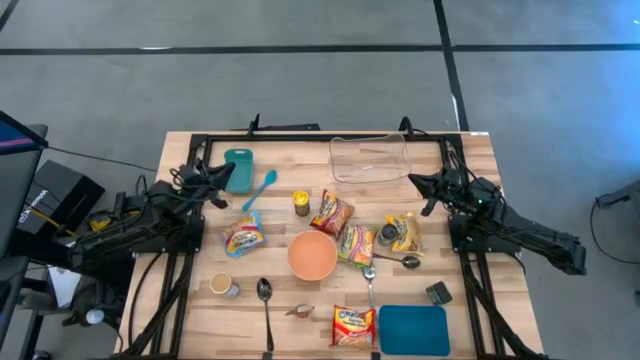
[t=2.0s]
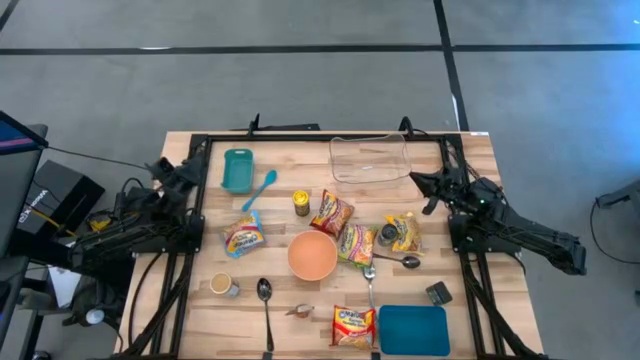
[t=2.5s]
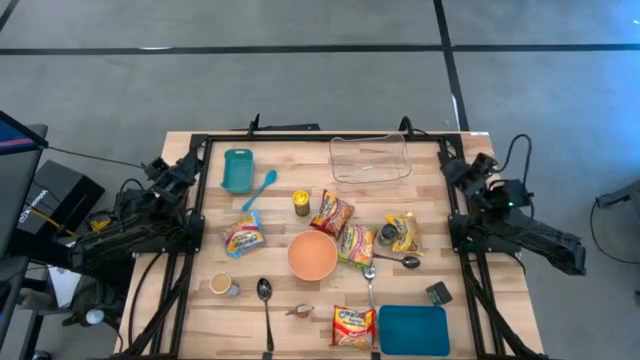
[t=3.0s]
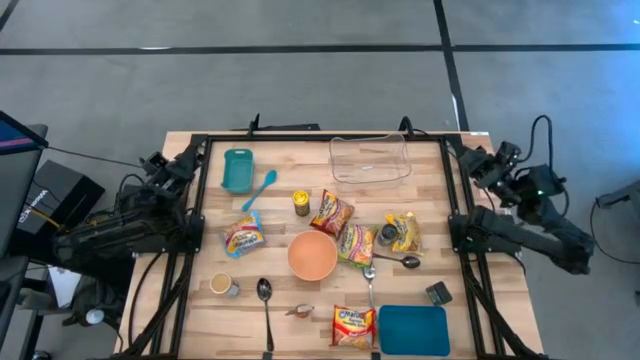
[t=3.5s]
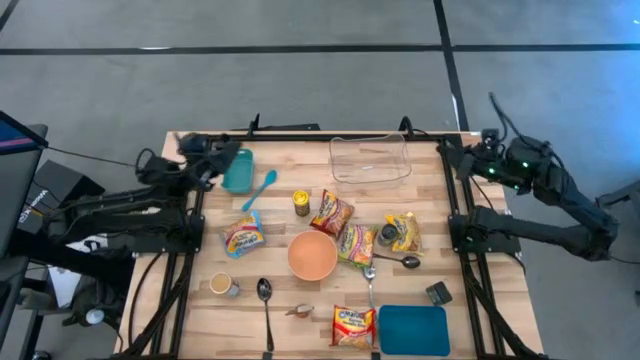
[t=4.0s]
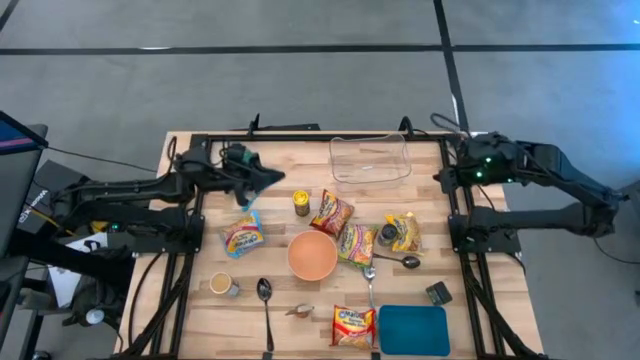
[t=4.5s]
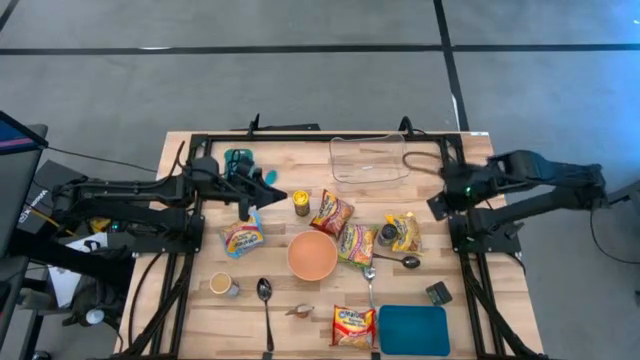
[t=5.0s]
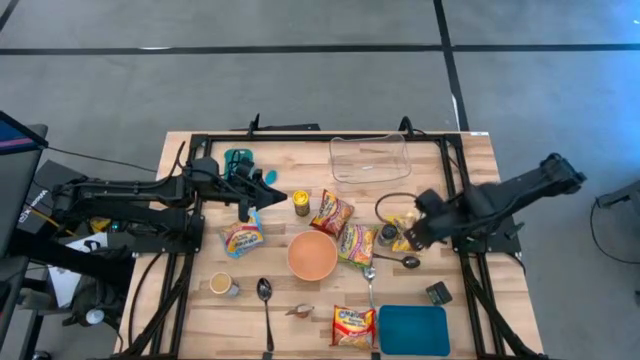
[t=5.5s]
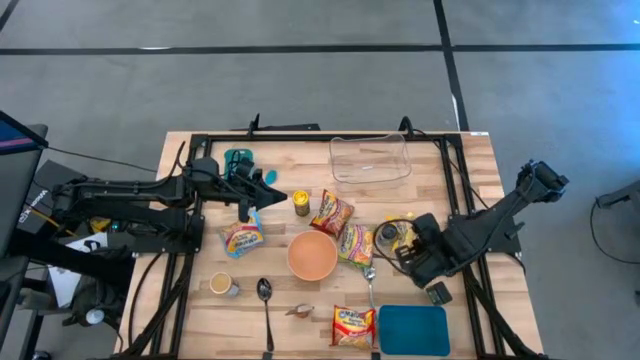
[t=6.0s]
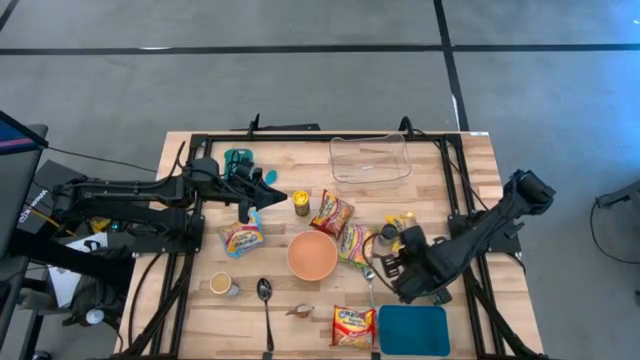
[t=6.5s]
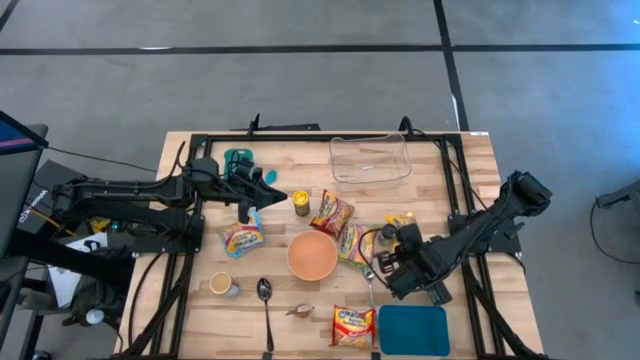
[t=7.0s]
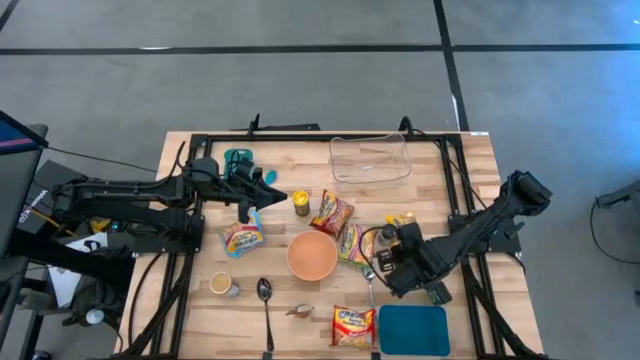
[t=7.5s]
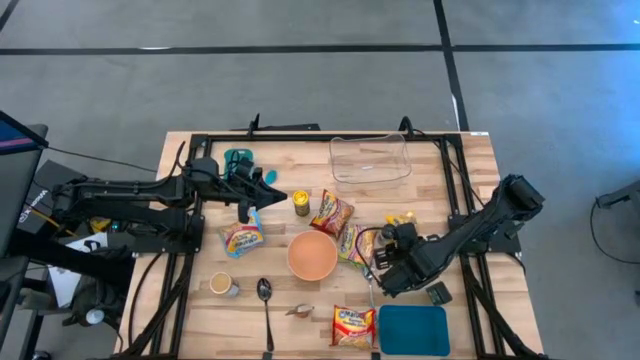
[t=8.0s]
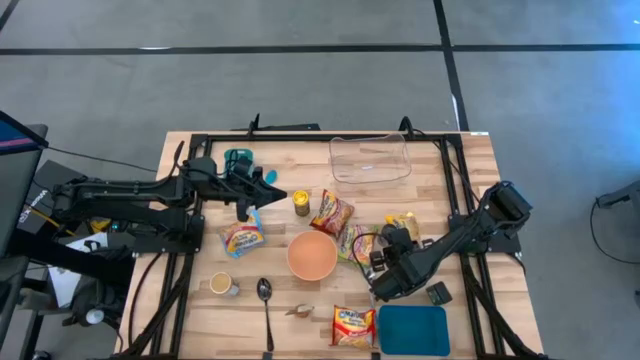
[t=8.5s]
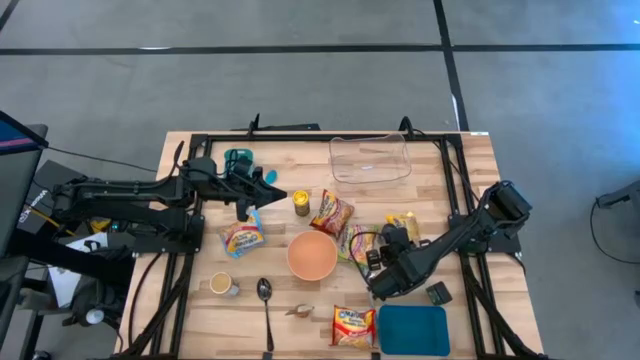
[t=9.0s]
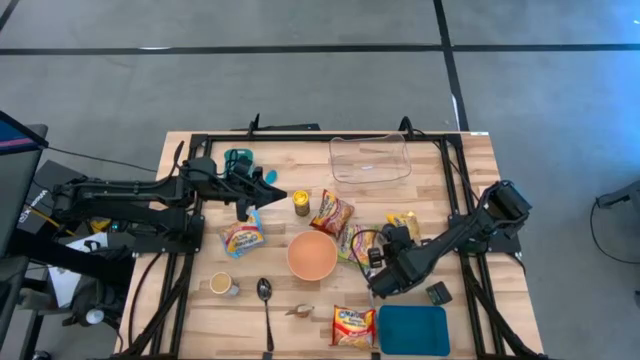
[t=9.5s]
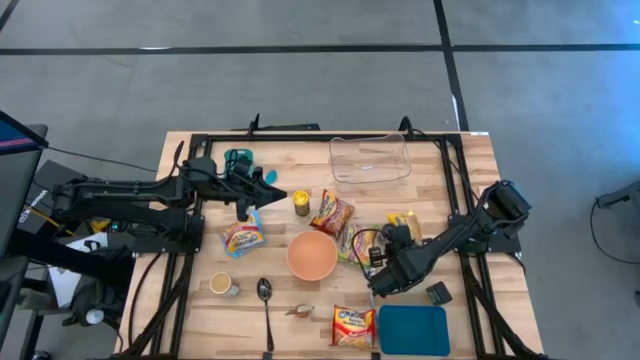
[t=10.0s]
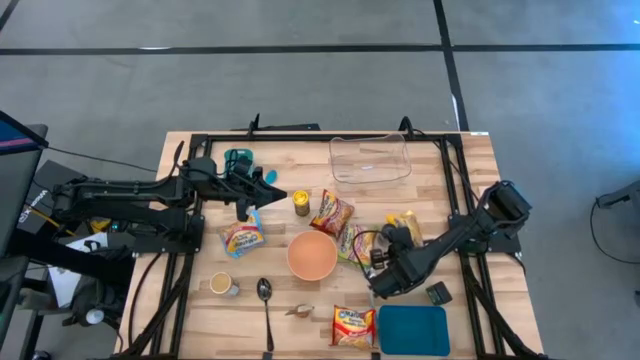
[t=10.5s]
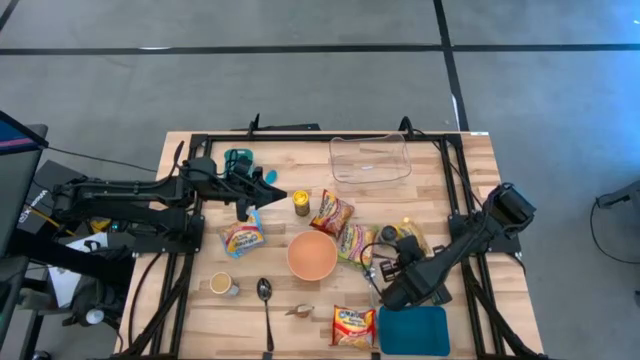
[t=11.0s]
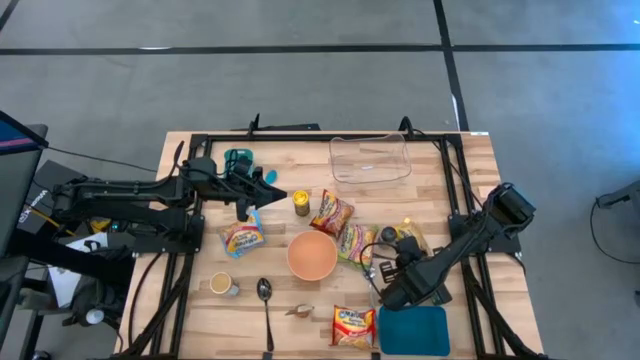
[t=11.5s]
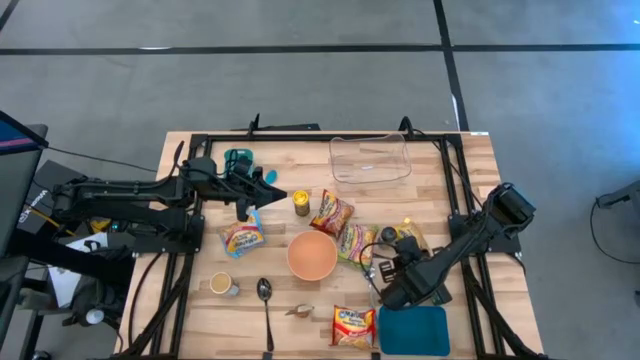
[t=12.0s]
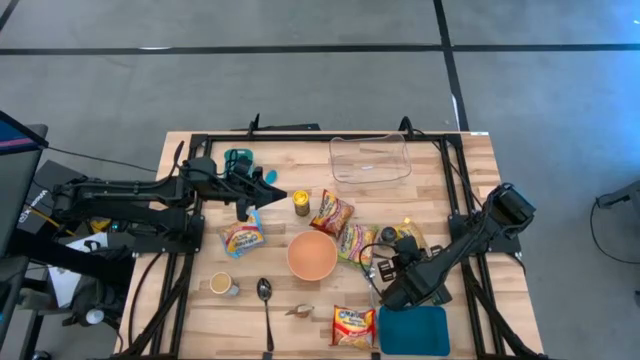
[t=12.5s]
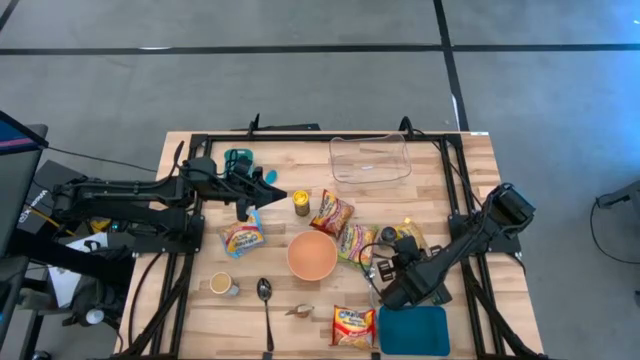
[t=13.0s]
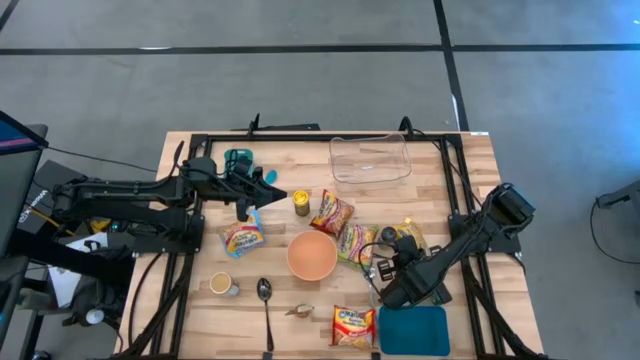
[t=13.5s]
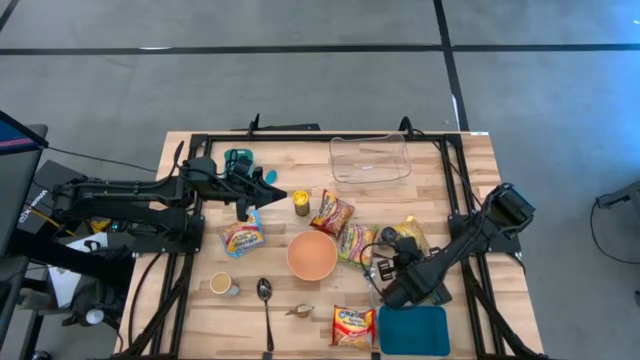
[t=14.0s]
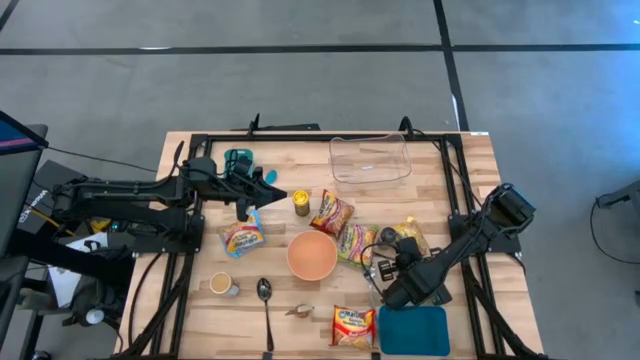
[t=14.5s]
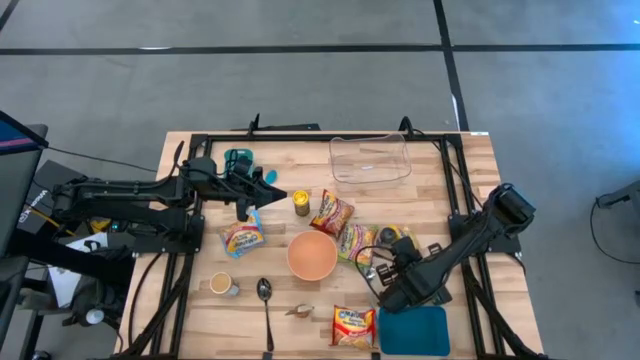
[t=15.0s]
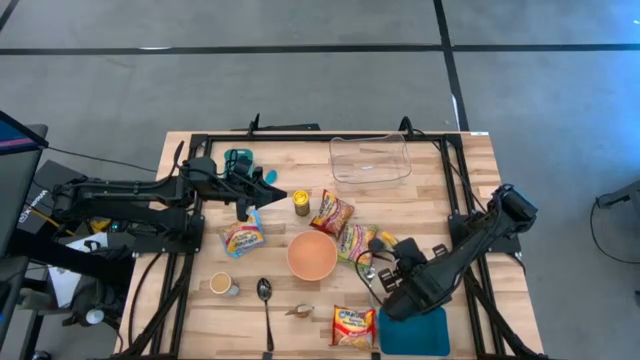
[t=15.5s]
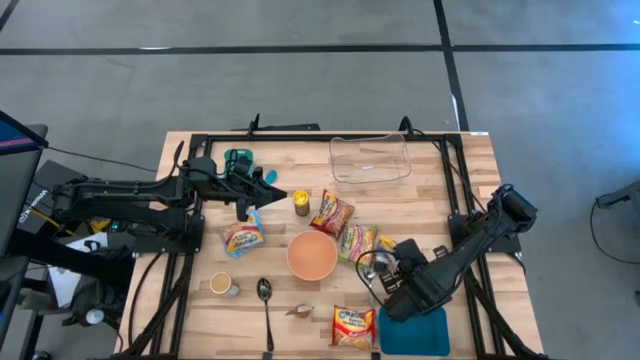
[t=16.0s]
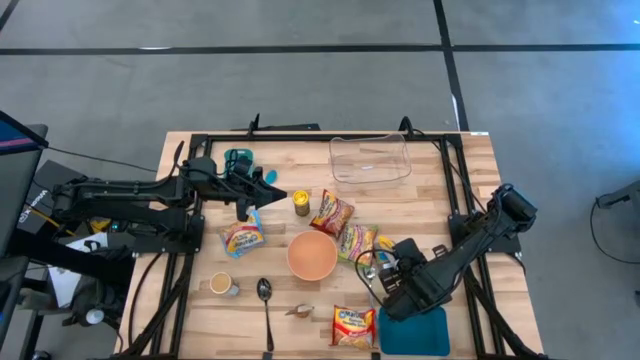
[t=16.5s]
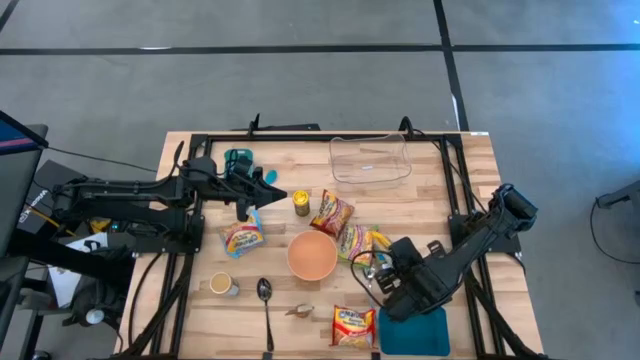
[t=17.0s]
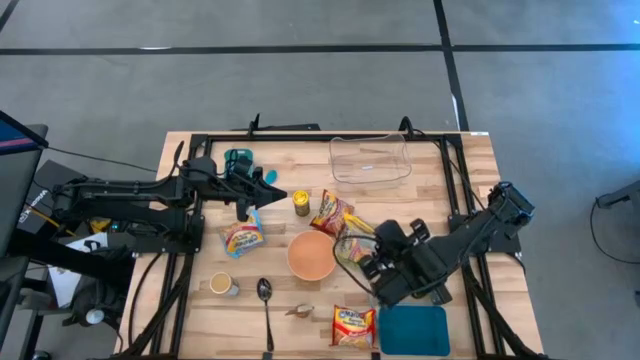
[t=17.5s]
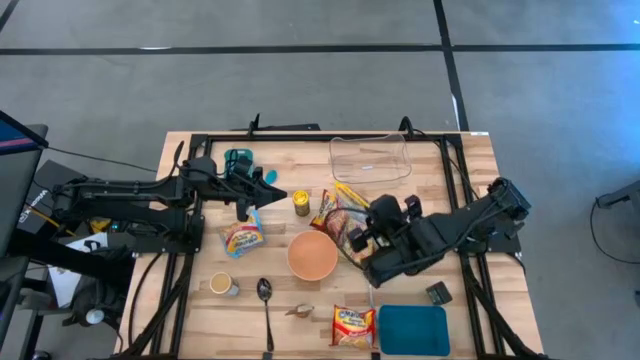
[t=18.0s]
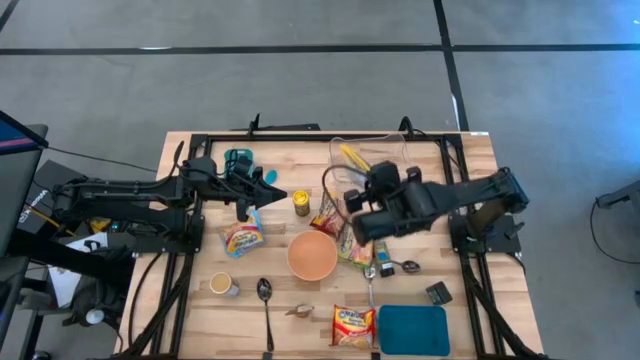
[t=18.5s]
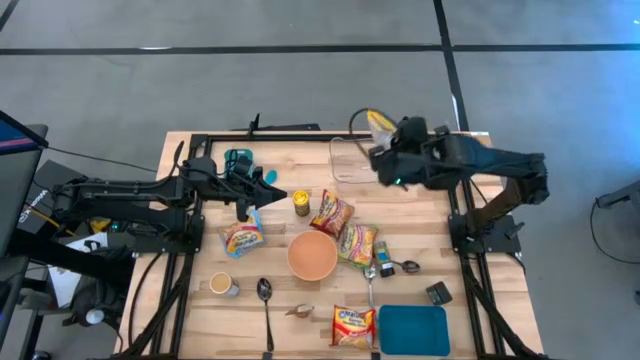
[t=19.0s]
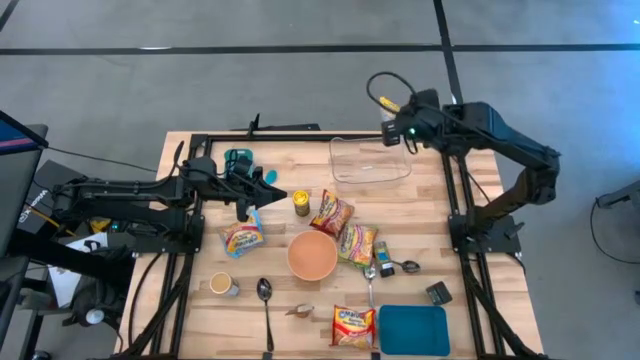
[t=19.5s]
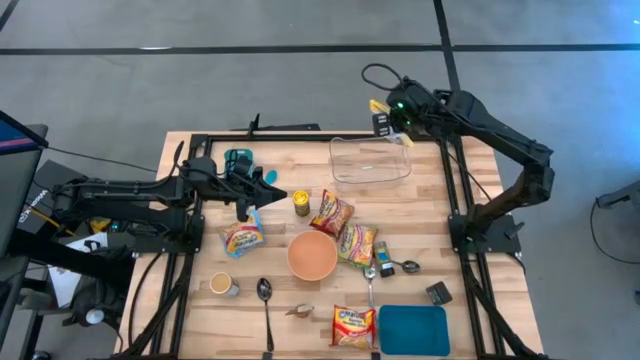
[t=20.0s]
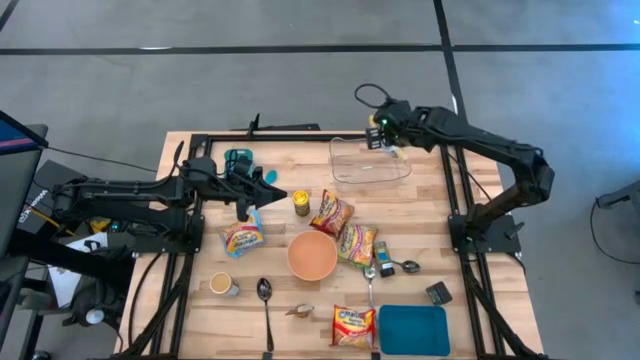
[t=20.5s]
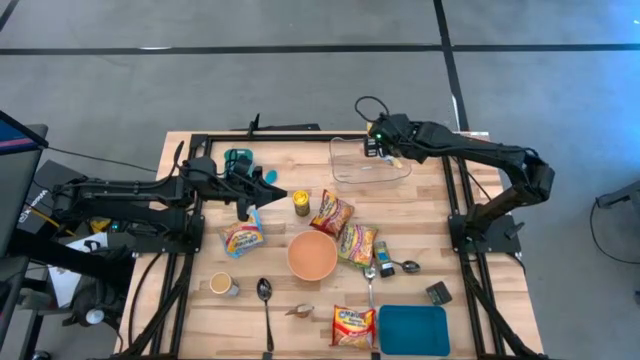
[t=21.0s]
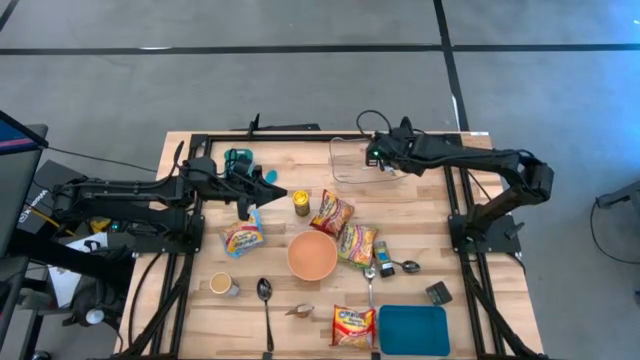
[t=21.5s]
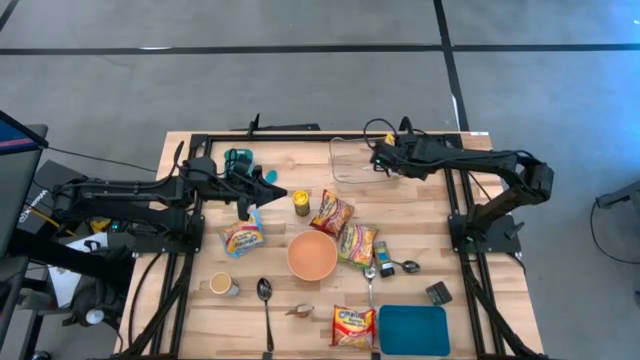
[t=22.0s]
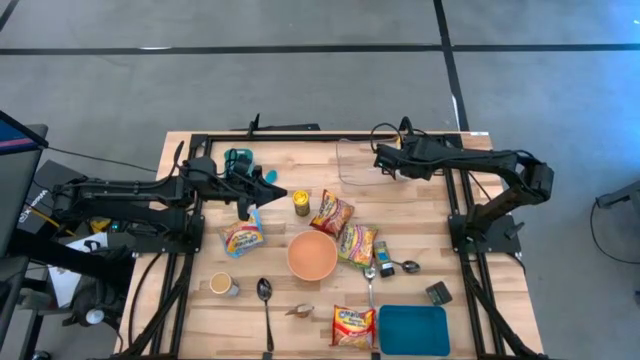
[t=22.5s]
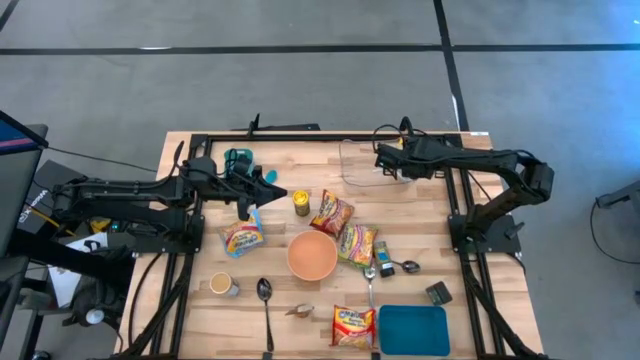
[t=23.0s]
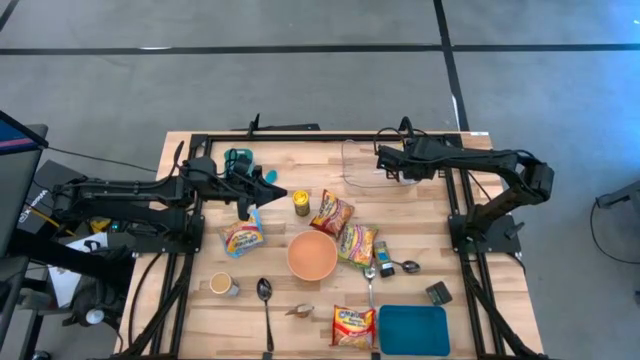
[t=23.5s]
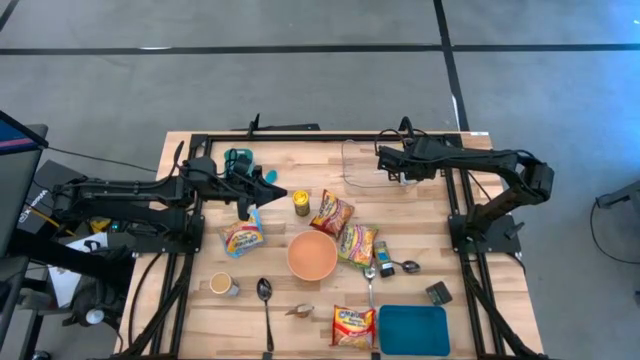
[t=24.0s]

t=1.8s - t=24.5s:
Task: Pick & Place Food Item
Put the yellow noodle pack into the transparent bin
